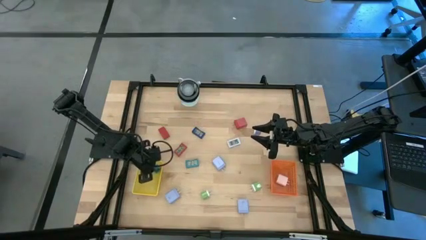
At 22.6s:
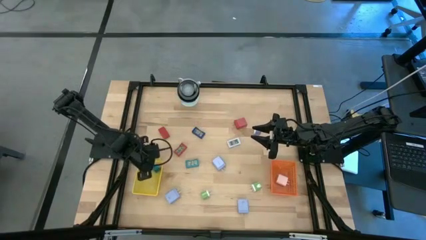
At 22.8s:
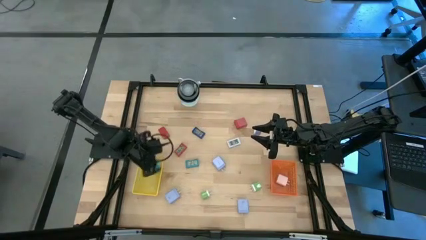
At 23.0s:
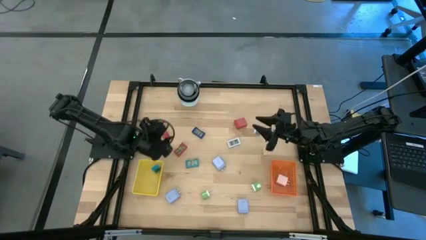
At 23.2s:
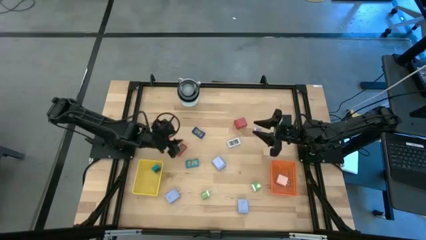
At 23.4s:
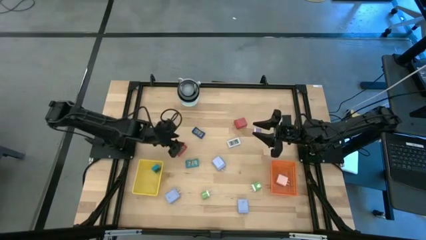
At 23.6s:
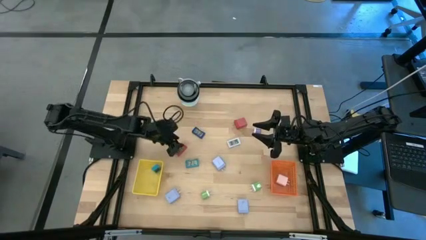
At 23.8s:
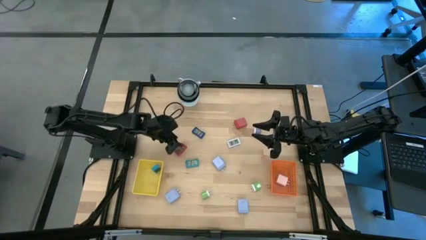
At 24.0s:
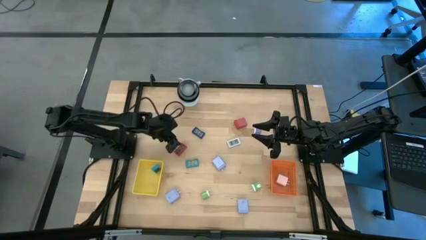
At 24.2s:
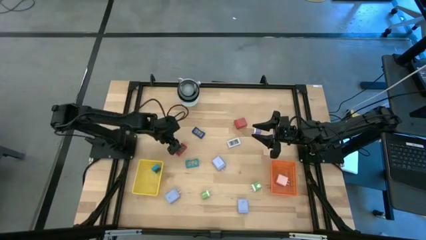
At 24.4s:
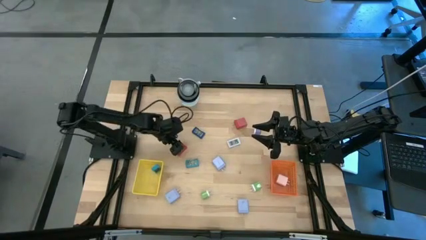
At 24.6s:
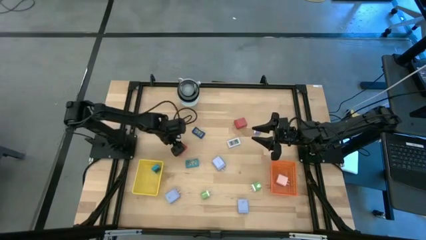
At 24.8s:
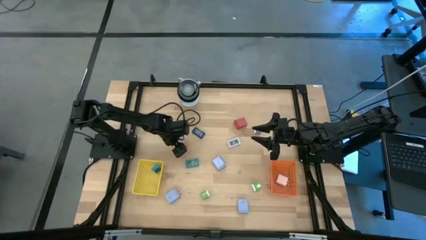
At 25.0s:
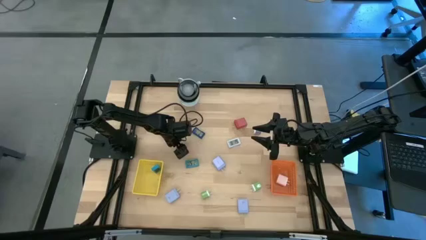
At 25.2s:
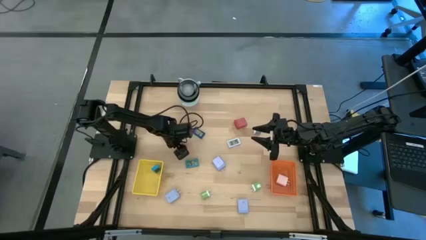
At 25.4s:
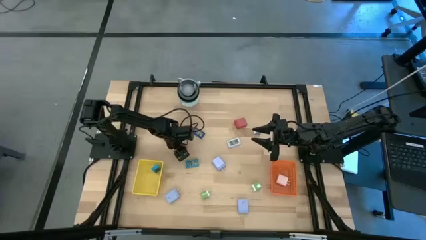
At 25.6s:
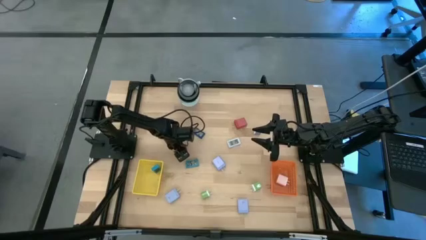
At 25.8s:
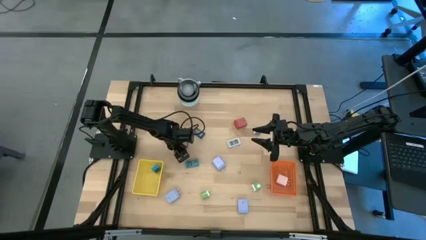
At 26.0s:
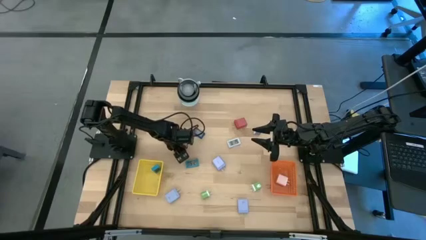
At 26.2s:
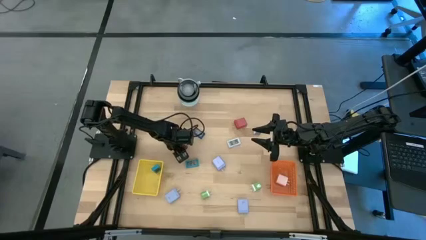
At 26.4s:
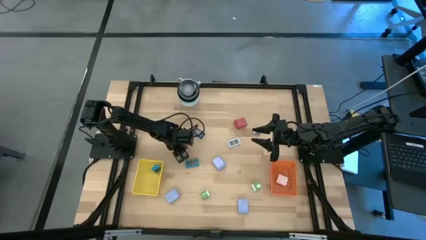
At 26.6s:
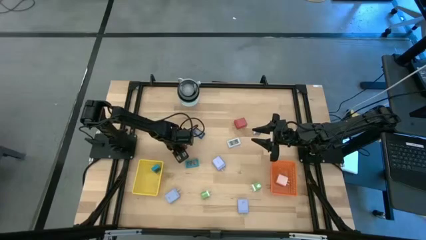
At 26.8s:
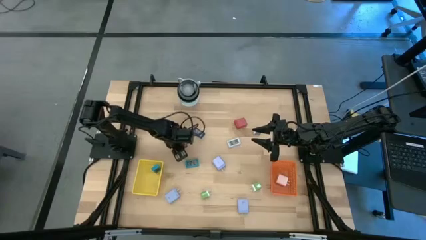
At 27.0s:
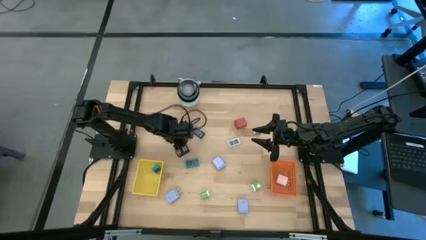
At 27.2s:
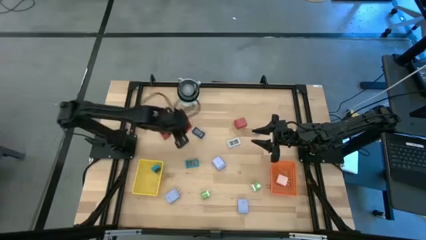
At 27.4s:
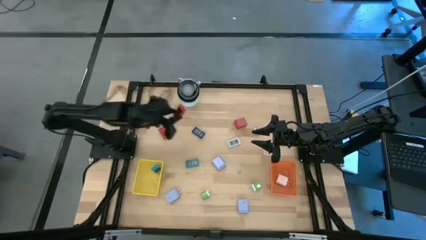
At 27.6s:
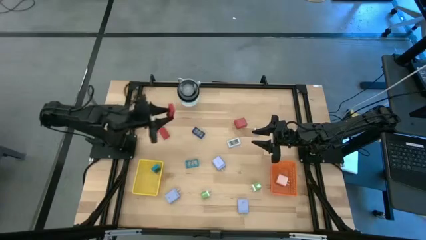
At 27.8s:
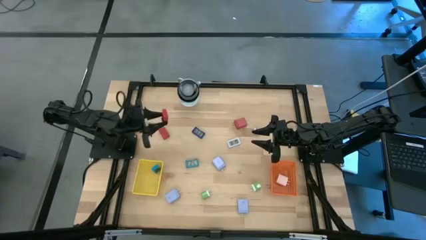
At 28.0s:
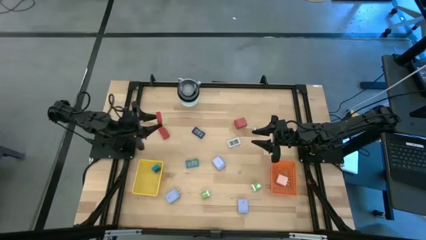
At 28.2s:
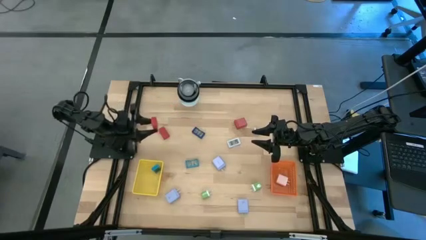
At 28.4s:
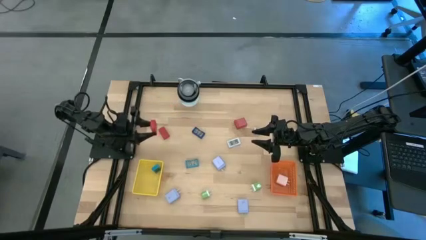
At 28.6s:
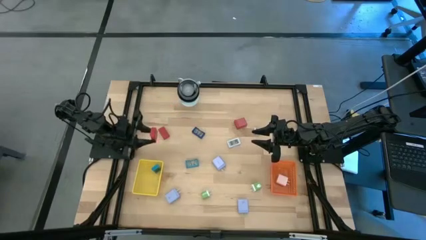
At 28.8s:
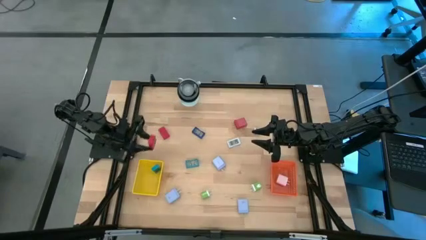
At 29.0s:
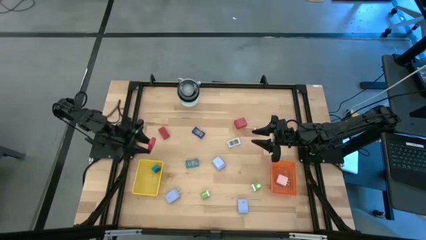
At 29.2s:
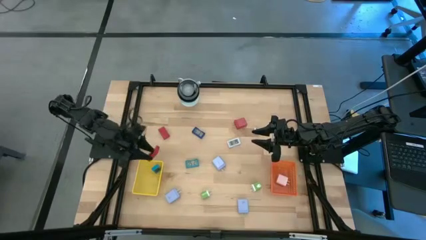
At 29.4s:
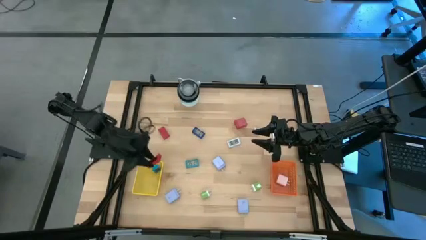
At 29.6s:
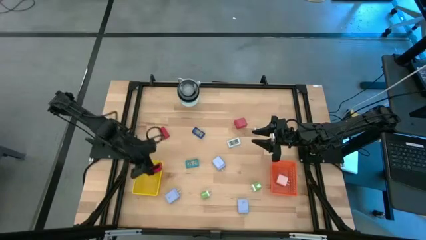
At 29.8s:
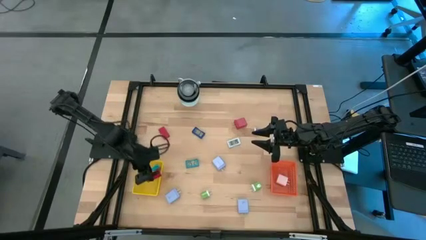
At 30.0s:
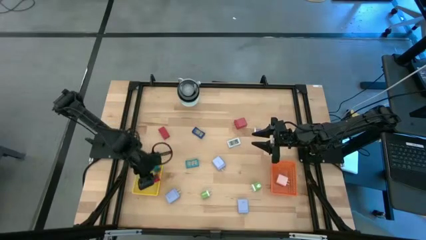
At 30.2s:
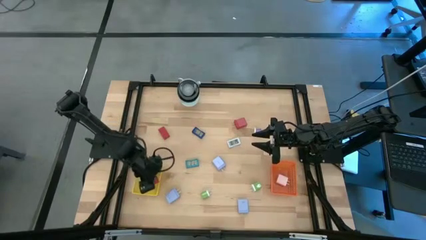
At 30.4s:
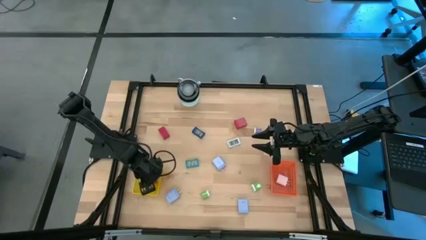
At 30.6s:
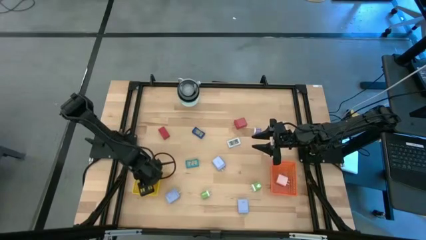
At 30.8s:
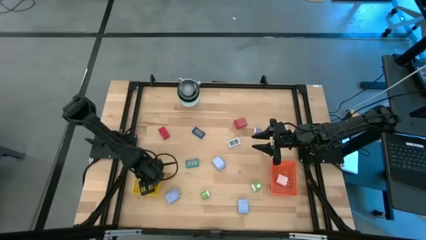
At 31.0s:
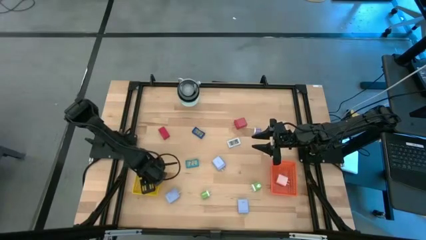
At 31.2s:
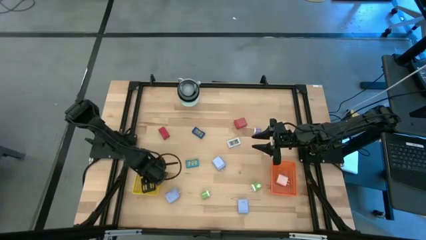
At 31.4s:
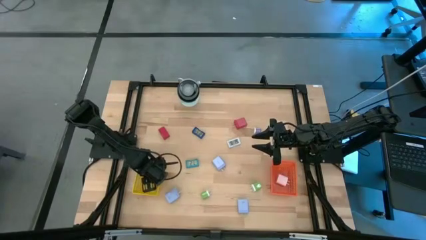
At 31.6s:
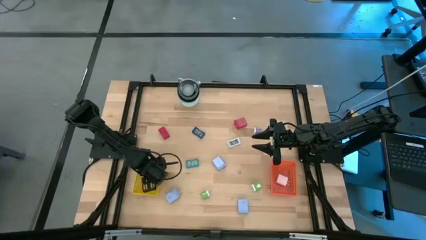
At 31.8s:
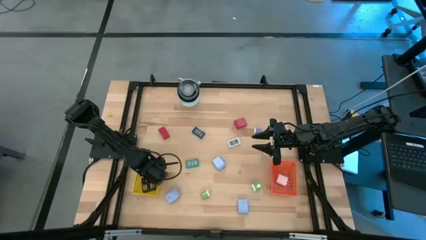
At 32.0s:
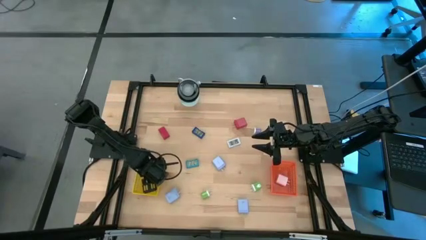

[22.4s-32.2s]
Task: Pick & Place Office items
Put the right red digital timer into the yellow basket

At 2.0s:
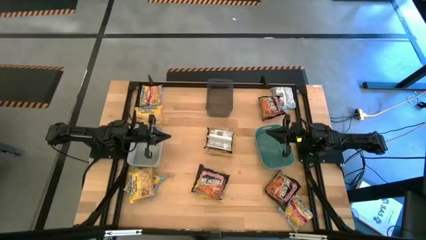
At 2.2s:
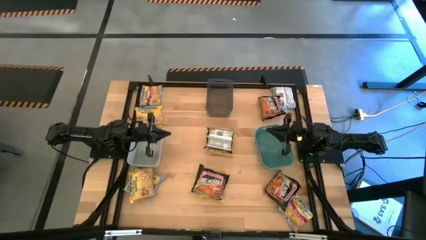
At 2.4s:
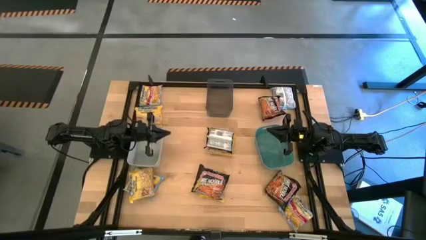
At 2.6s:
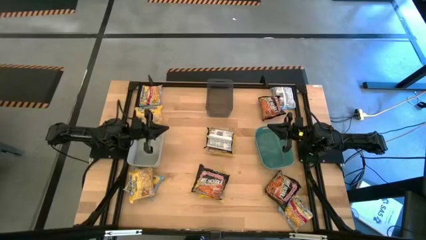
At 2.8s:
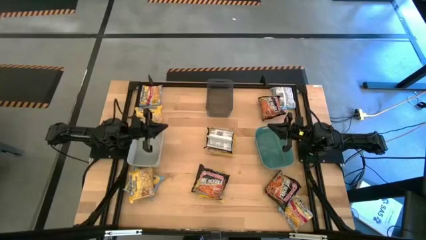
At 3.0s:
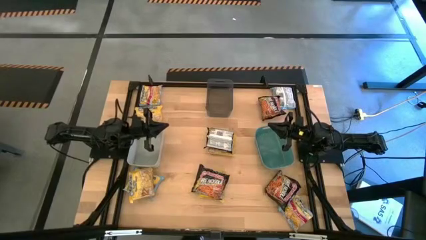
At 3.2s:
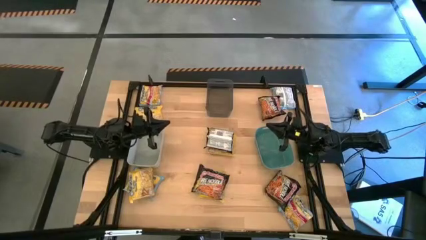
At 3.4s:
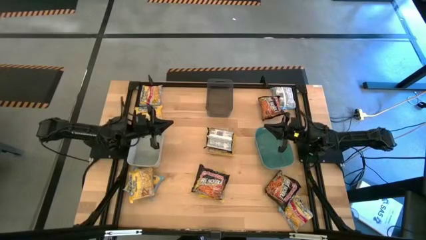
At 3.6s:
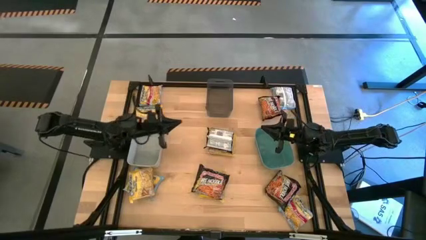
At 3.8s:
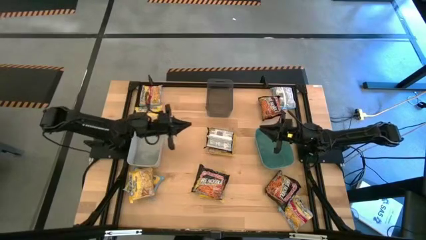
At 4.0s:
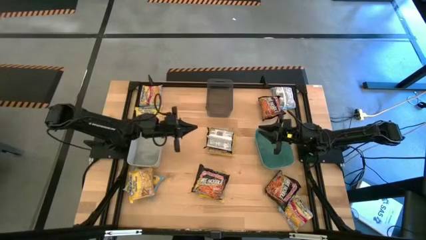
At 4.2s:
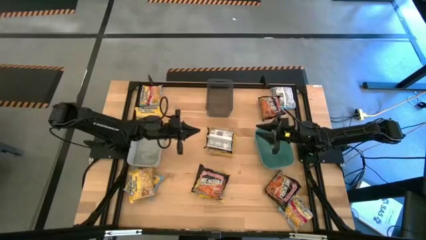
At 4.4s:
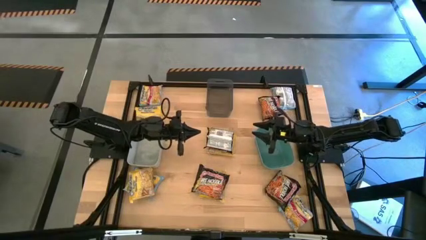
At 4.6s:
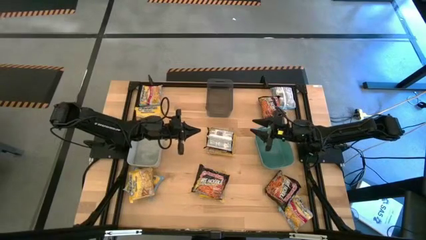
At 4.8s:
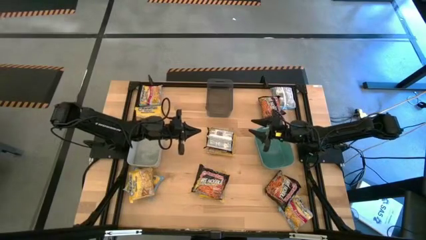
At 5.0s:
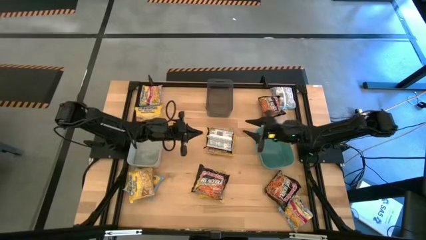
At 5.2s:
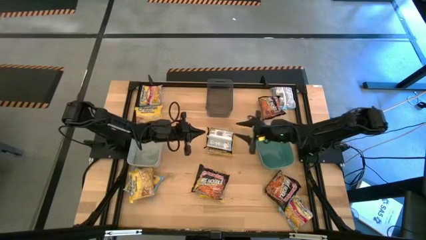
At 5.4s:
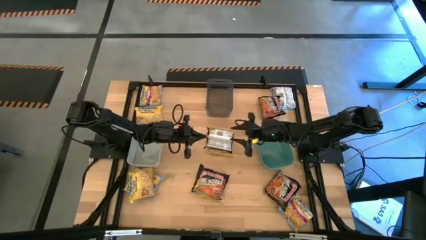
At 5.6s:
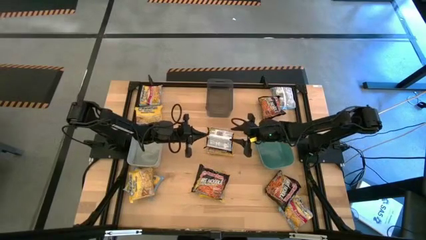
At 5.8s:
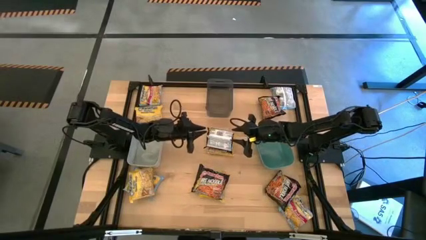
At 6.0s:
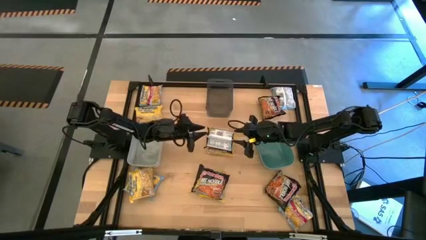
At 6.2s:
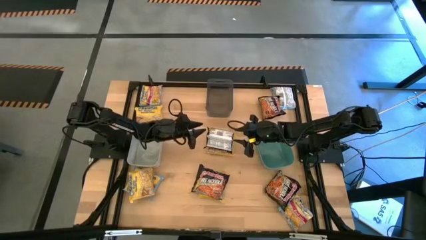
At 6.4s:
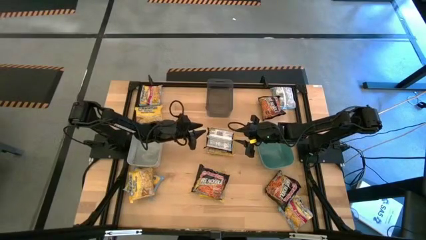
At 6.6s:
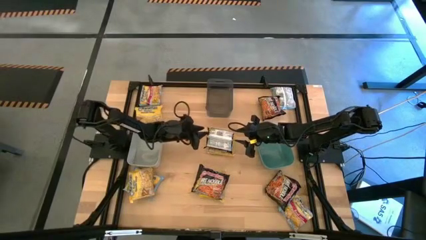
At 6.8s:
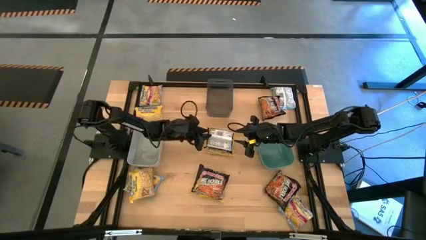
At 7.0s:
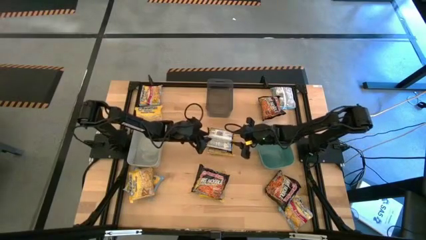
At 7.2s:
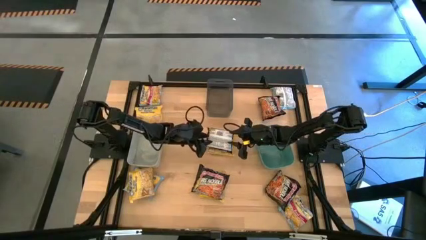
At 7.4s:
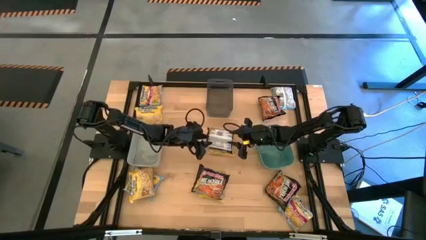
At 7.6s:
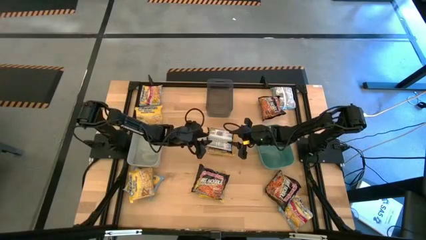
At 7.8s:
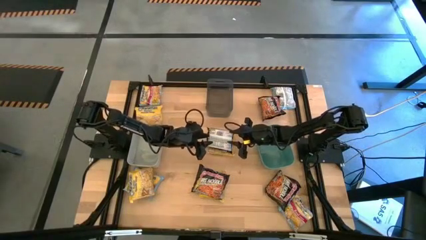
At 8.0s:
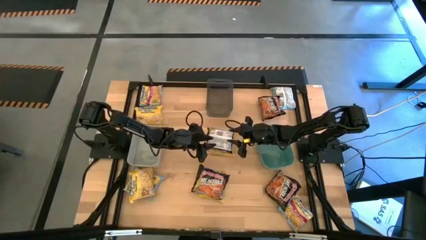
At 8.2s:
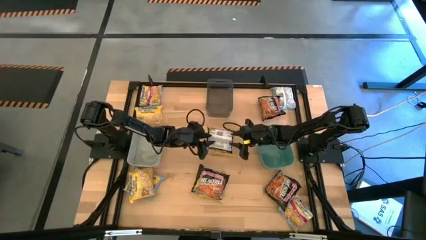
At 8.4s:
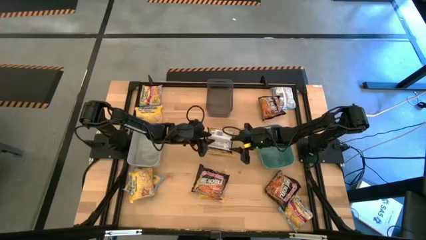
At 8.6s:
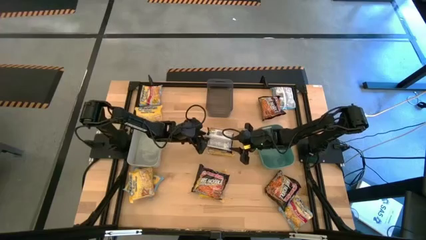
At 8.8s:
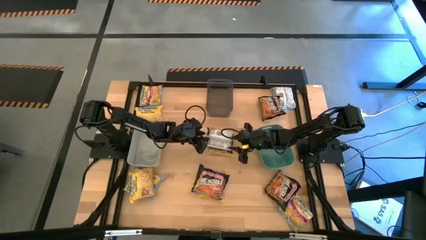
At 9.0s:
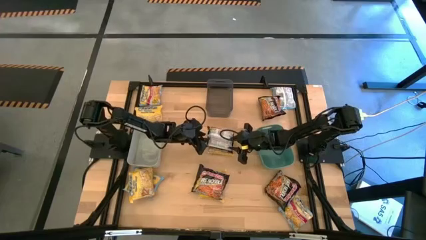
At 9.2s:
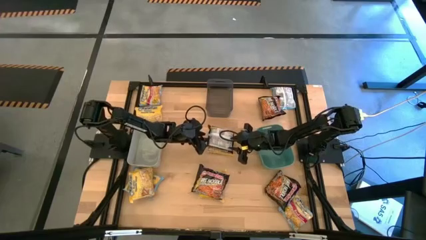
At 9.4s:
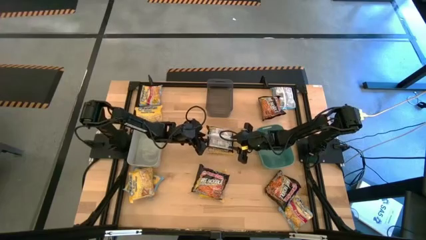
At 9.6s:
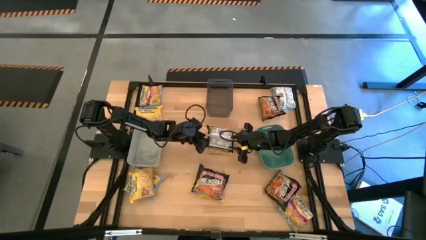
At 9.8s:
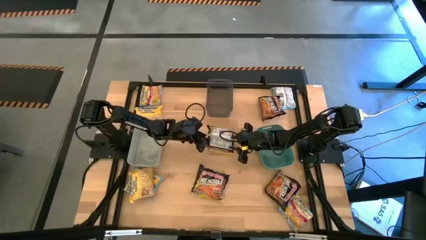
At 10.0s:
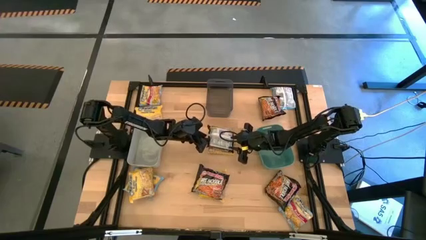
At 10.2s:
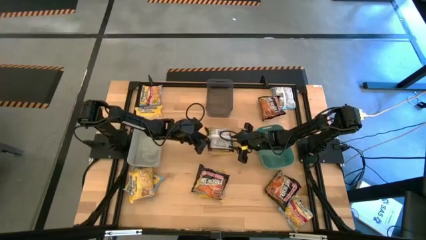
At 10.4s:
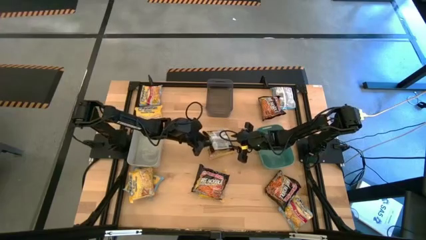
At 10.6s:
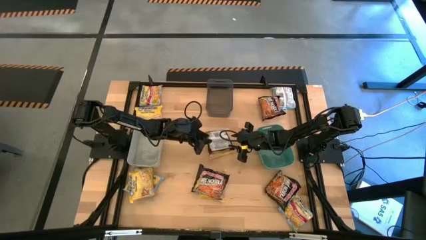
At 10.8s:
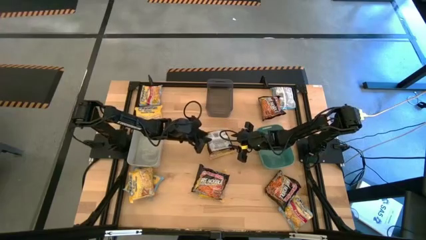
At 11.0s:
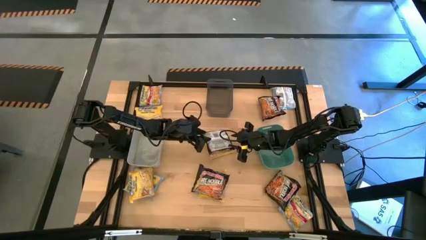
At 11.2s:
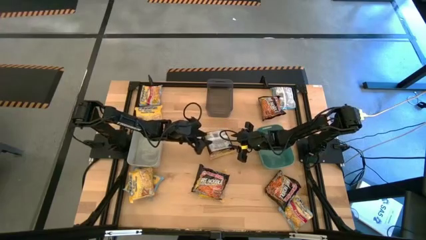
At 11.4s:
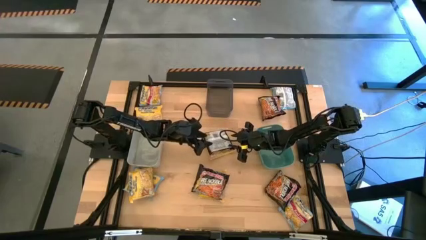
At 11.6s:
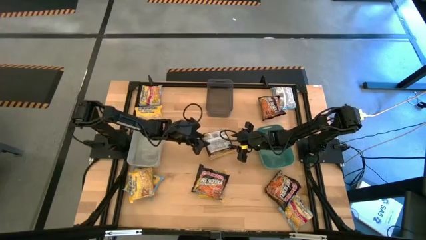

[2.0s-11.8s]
Task: Sort Maruchan noodles
Put the black noodle pack into the black bin
